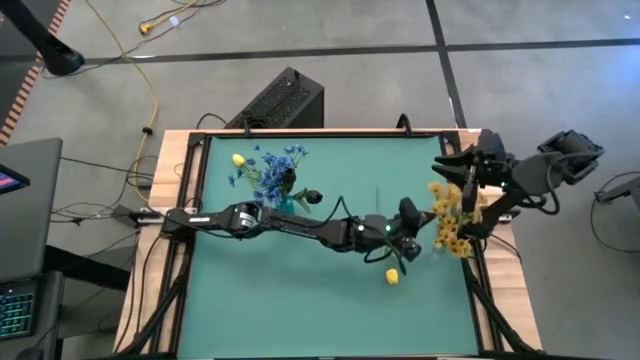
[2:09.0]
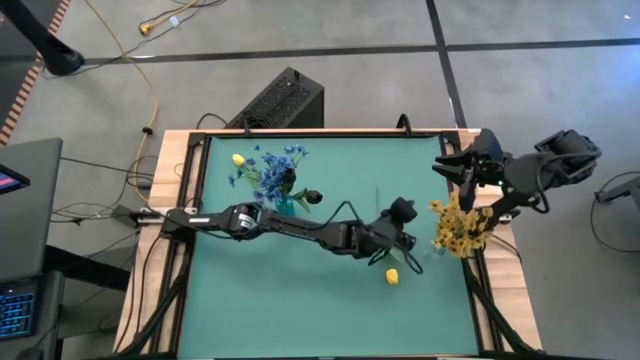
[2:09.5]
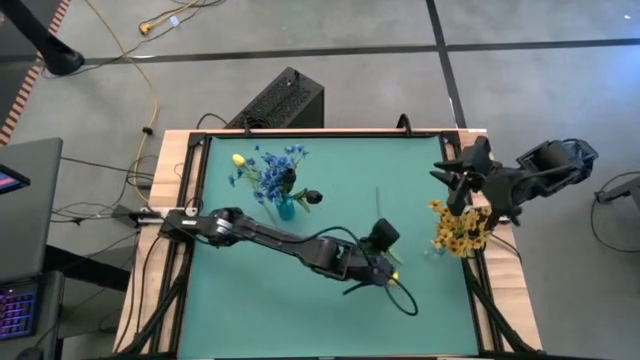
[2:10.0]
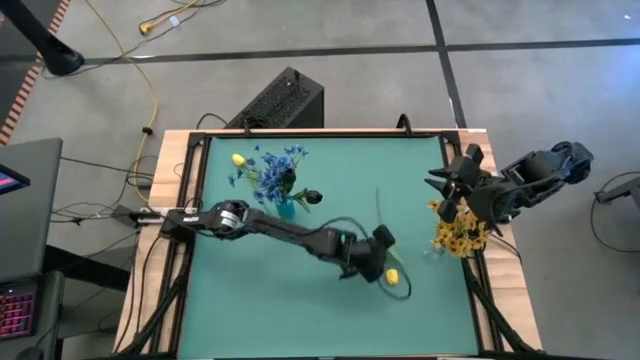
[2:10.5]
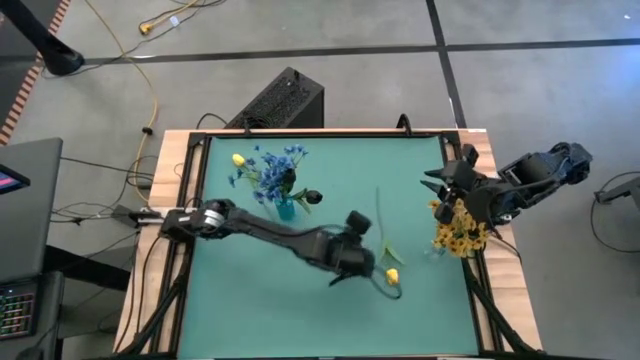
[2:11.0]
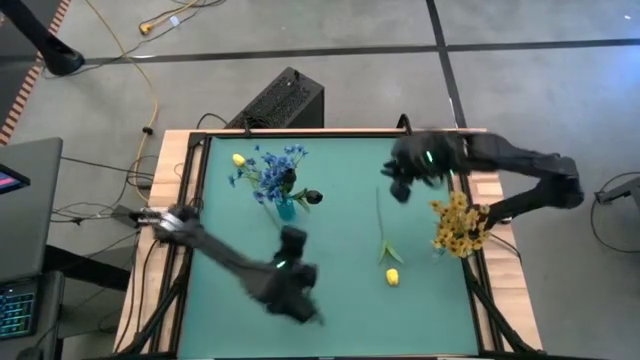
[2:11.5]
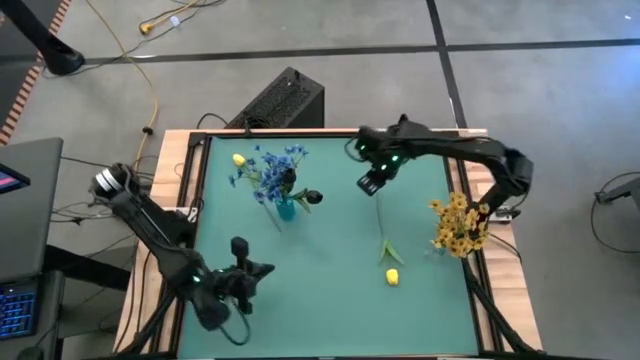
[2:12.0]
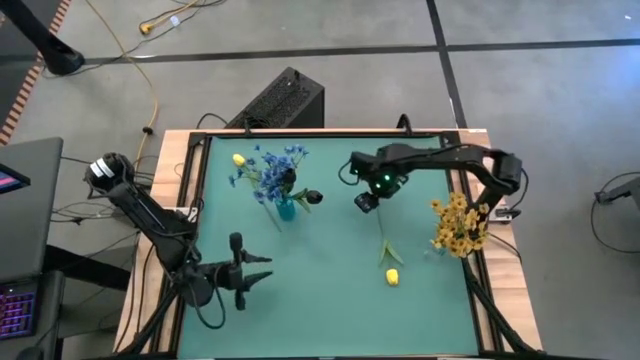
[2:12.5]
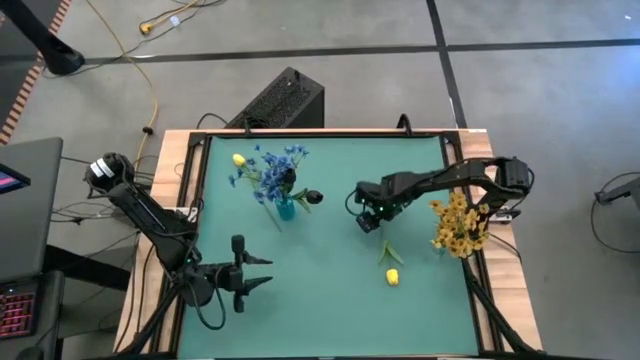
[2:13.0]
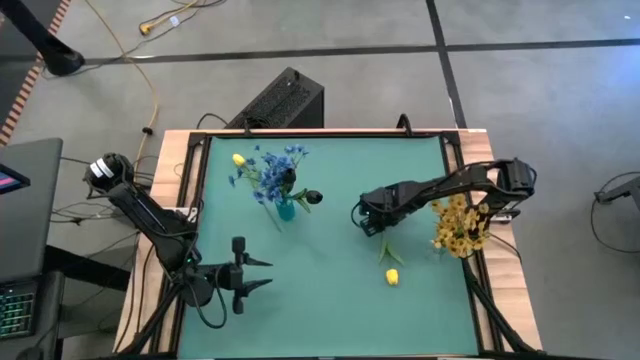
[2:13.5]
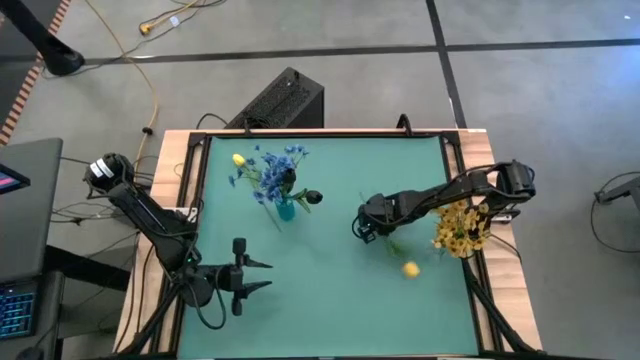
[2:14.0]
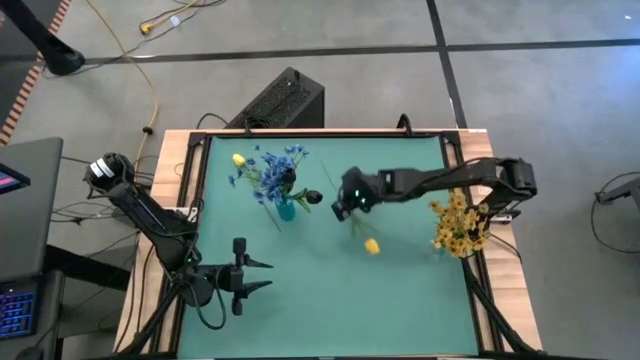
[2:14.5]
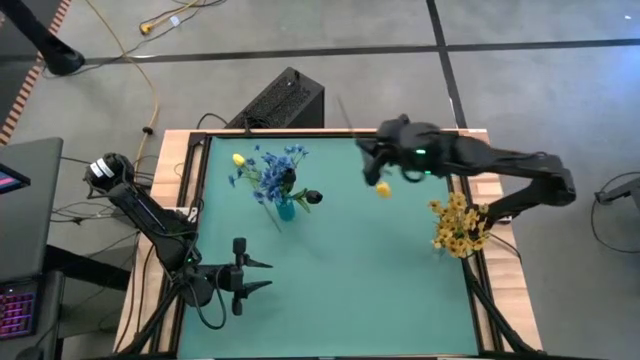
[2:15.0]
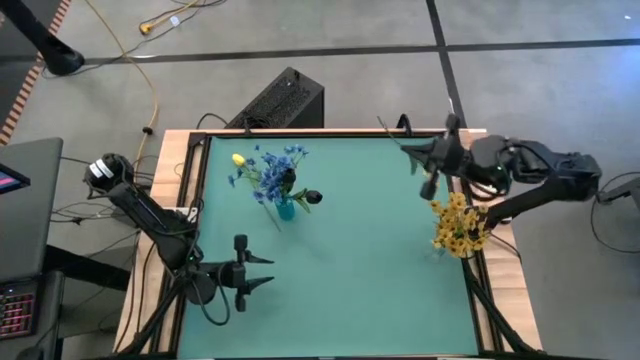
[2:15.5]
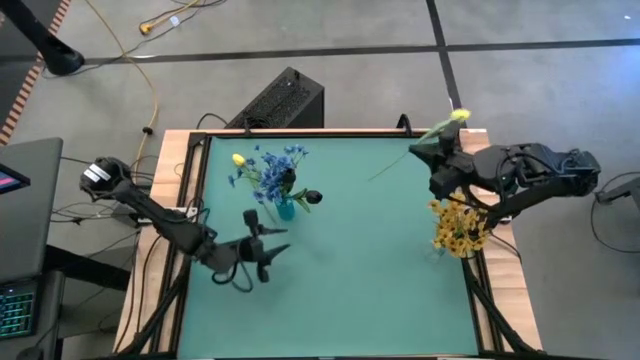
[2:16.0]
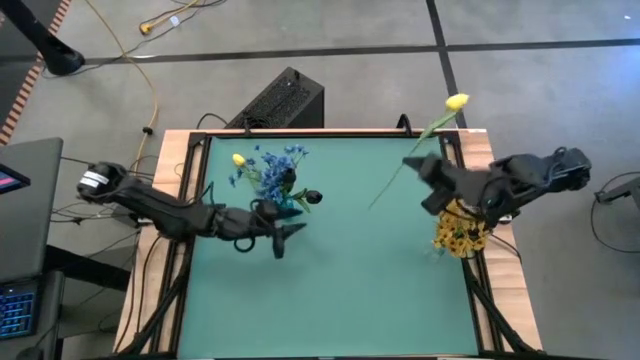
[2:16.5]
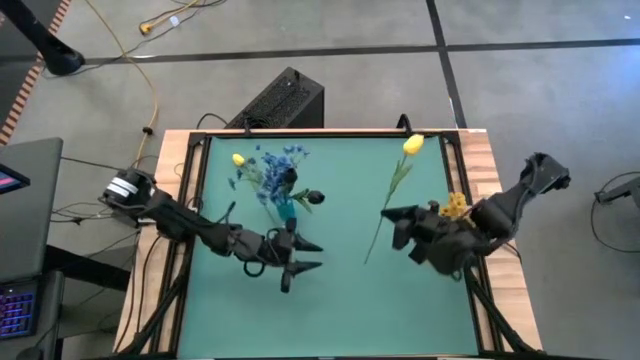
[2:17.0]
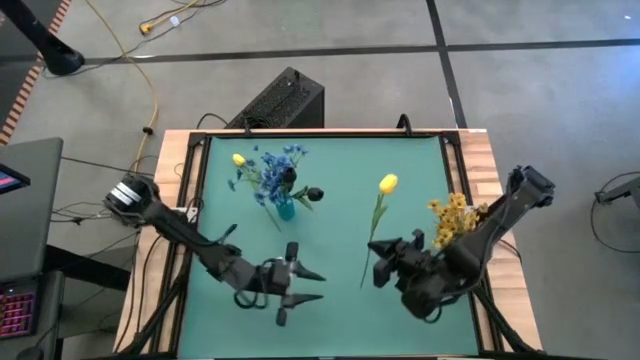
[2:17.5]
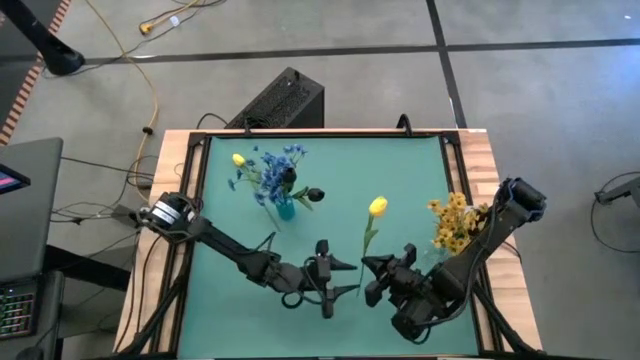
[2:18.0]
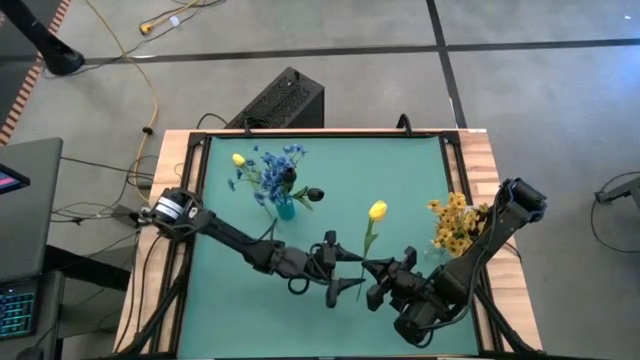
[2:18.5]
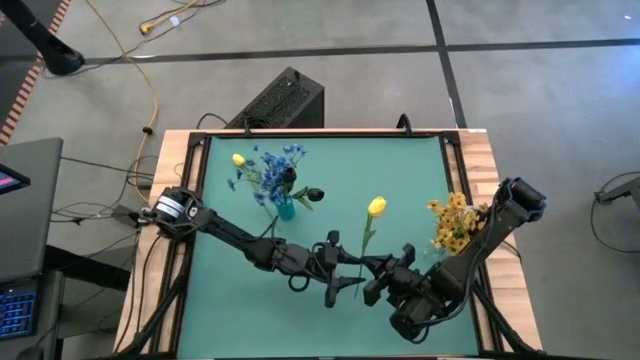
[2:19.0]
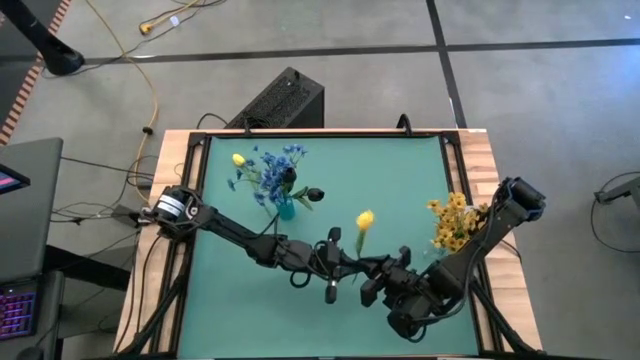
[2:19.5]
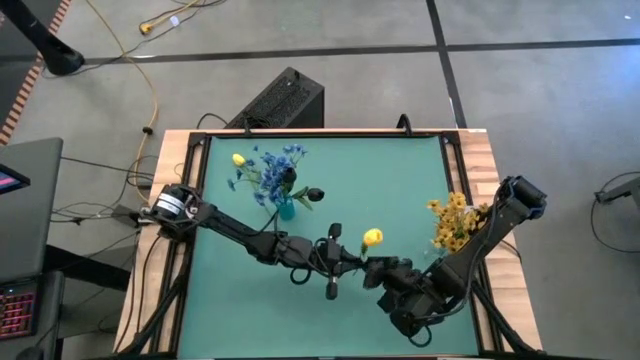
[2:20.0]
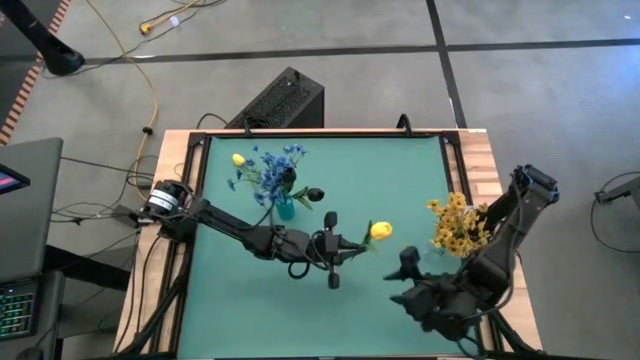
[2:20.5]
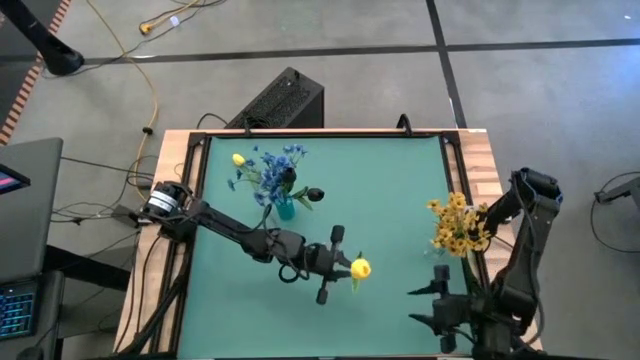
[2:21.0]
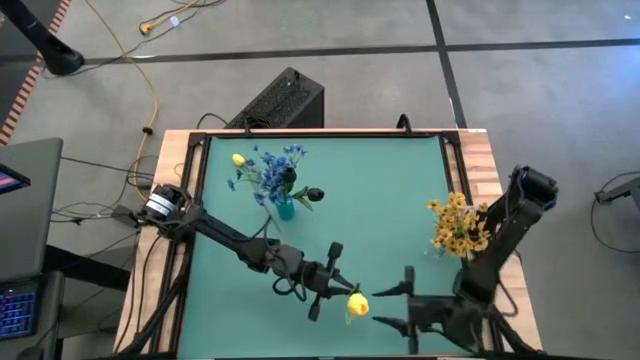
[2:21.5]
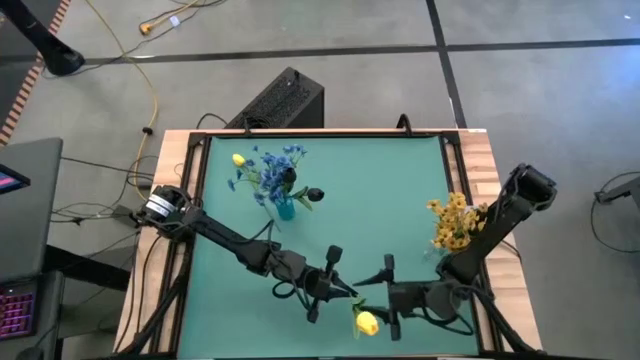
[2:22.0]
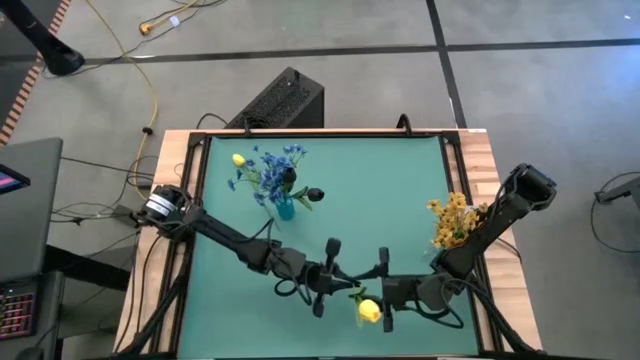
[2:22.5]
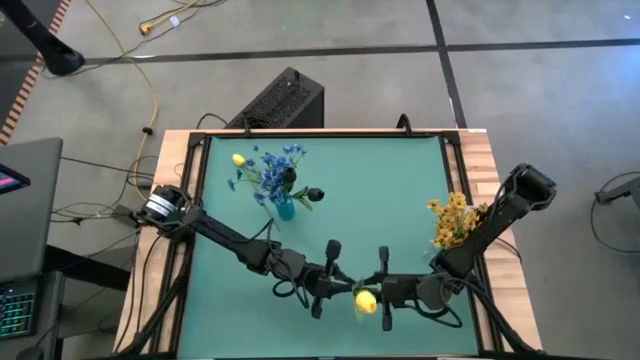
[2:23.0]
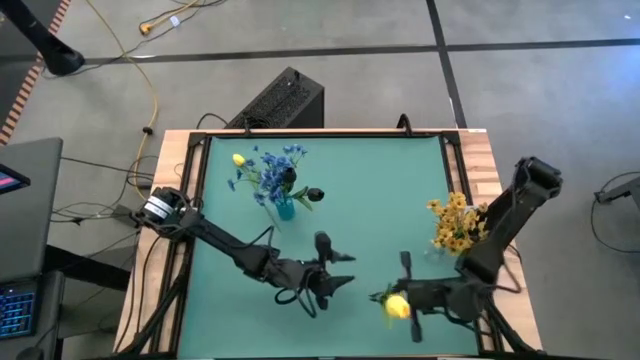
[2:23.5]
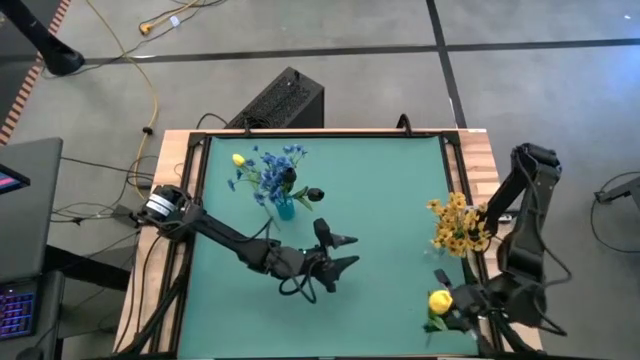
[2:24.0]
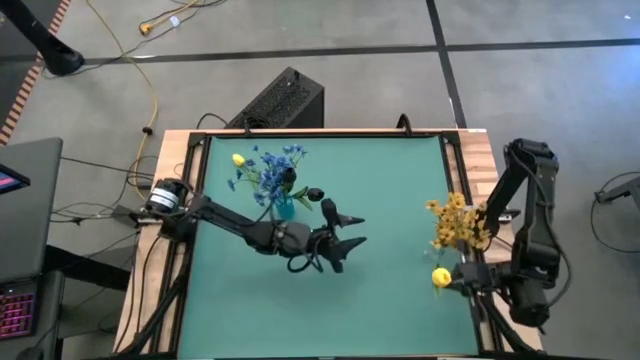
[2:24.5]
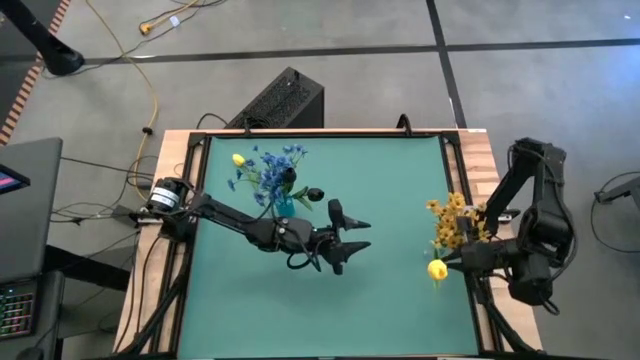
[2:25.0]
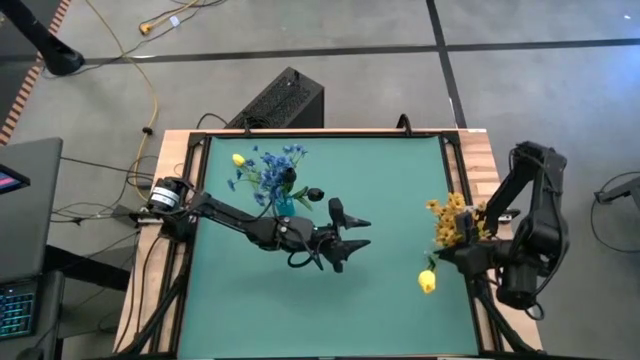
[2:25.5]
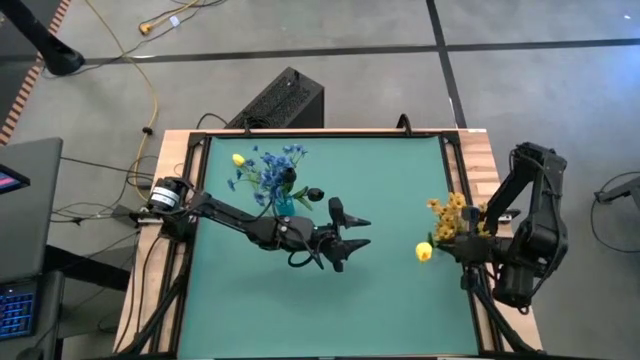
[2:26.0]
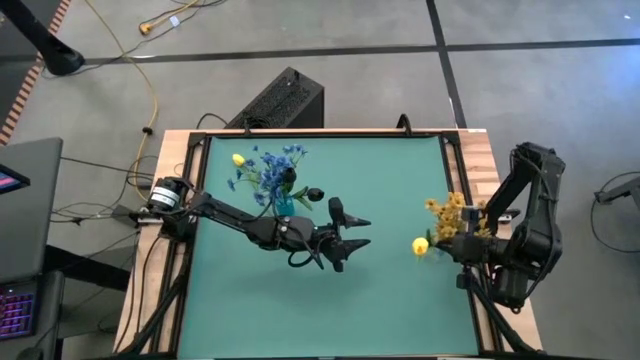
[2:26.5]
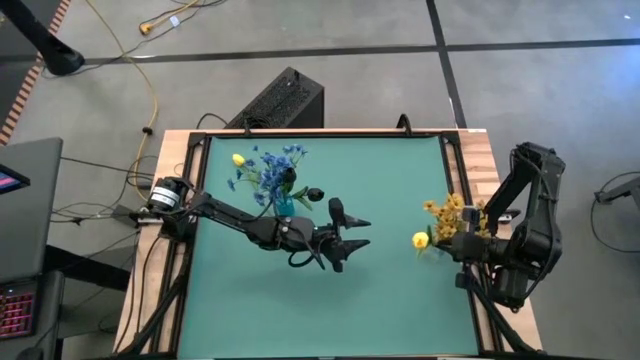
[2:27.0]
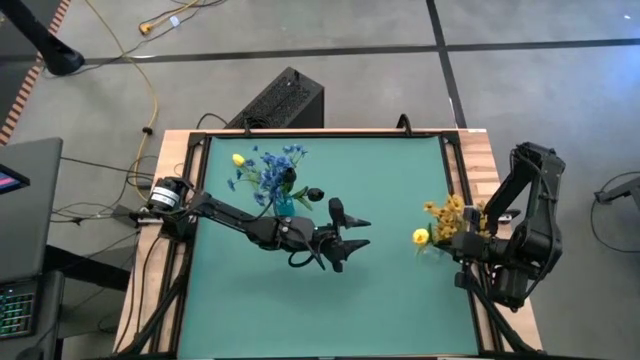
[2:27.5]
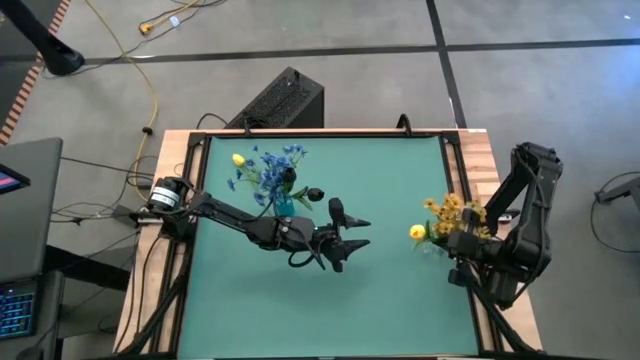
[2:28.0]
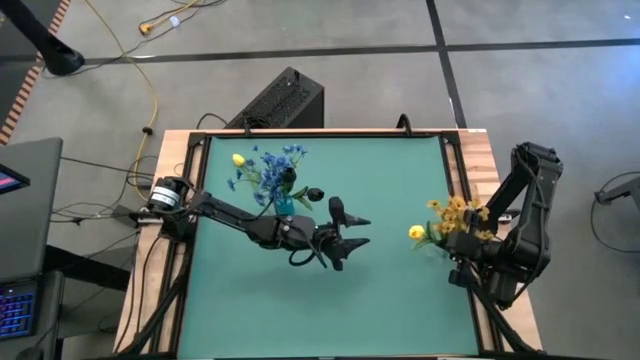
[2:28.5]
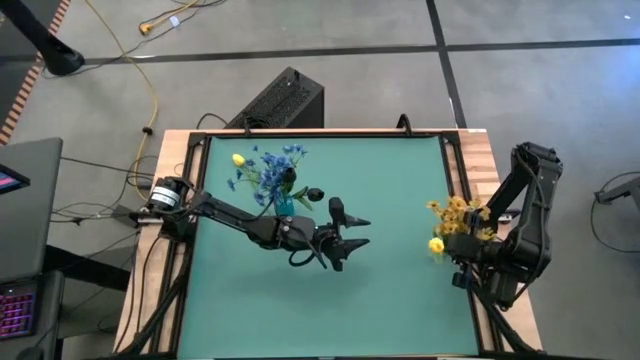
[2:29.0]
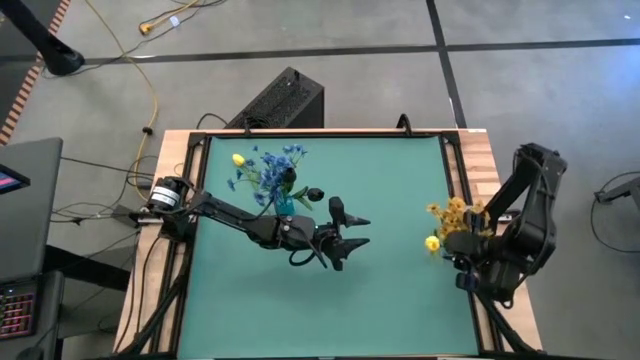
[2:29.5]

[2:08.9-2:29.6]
Task: Sort flowers into vase by color
Put the right yellow flower into the transparent vase
